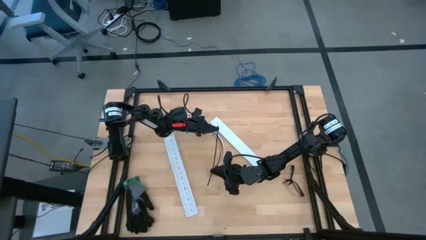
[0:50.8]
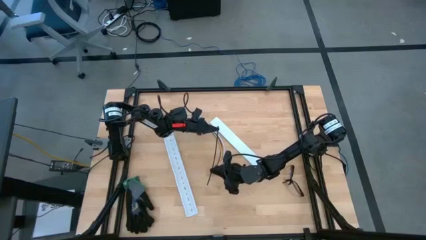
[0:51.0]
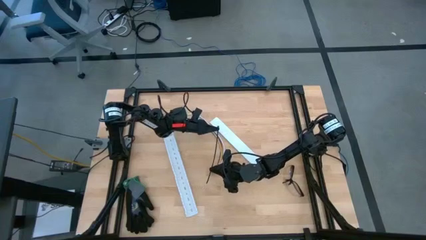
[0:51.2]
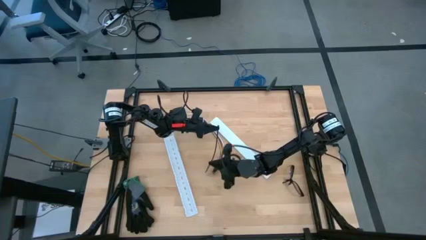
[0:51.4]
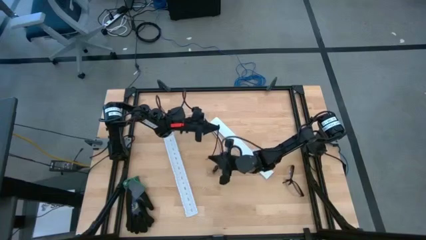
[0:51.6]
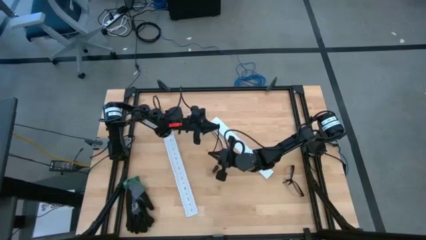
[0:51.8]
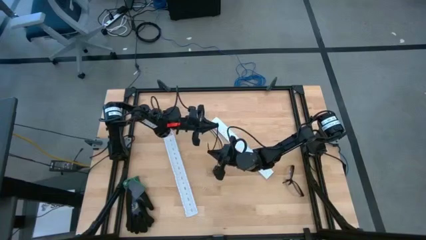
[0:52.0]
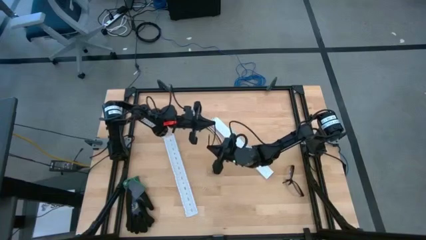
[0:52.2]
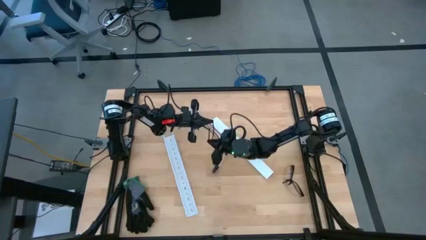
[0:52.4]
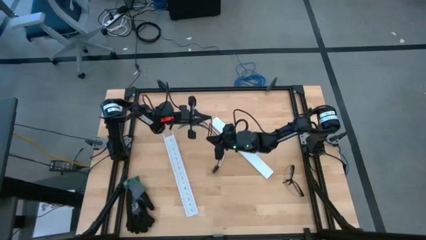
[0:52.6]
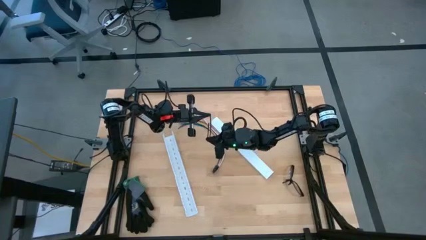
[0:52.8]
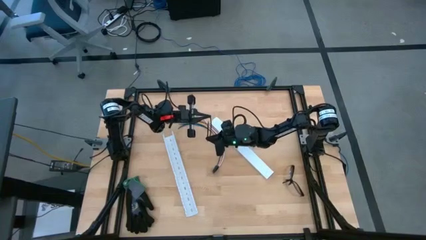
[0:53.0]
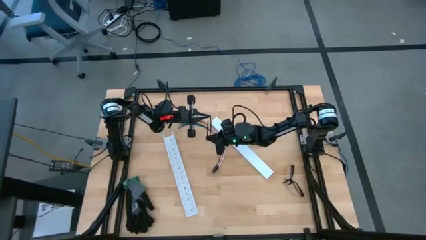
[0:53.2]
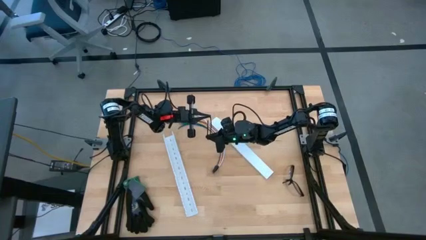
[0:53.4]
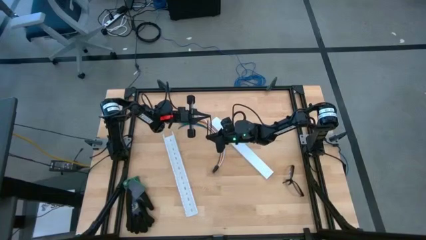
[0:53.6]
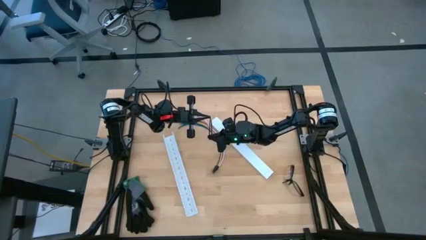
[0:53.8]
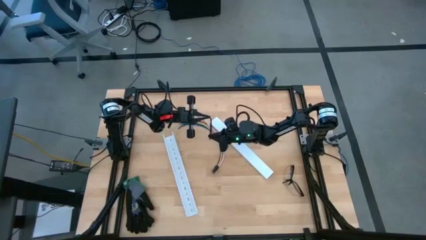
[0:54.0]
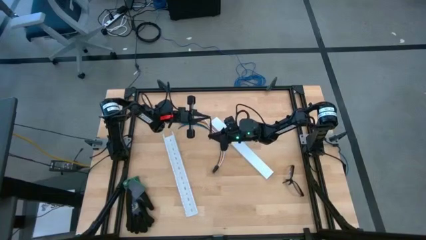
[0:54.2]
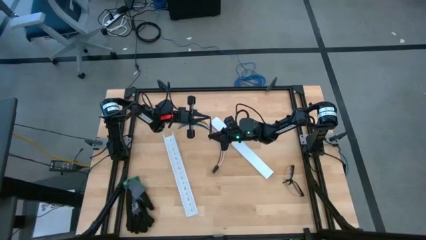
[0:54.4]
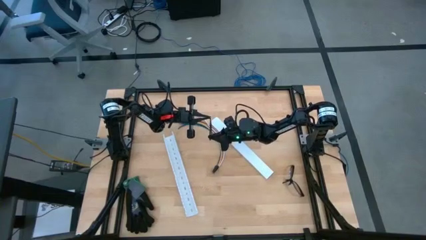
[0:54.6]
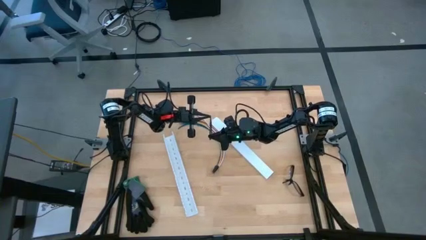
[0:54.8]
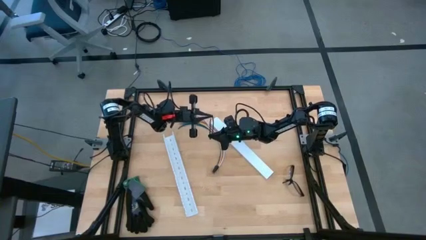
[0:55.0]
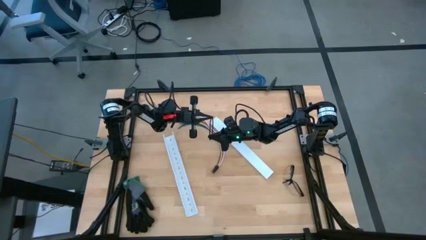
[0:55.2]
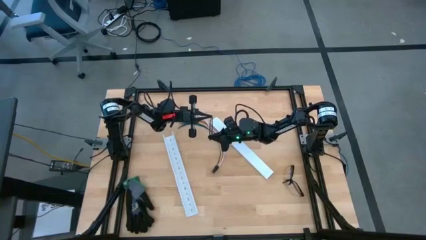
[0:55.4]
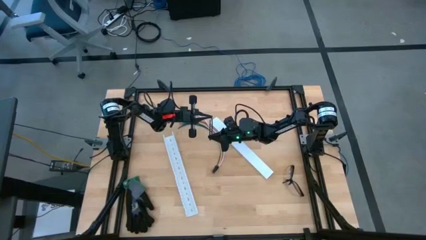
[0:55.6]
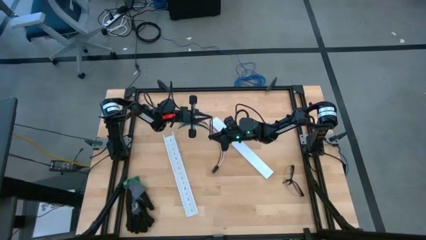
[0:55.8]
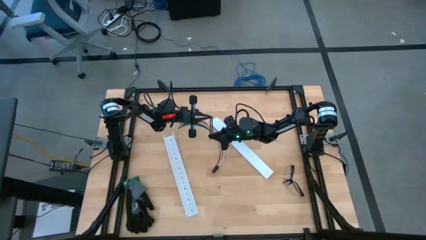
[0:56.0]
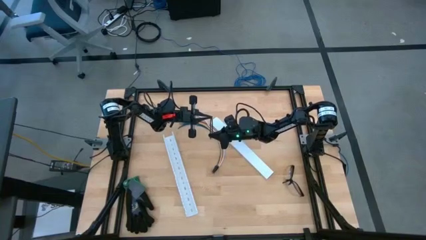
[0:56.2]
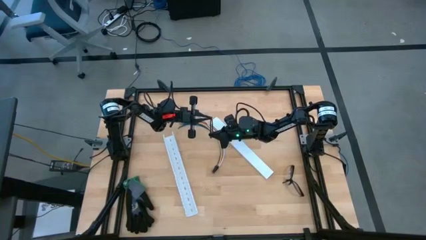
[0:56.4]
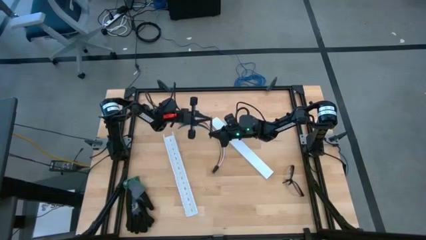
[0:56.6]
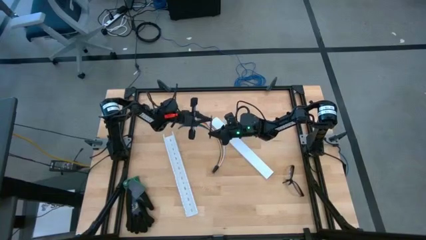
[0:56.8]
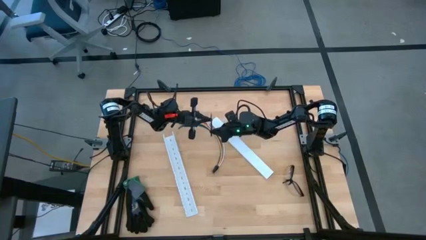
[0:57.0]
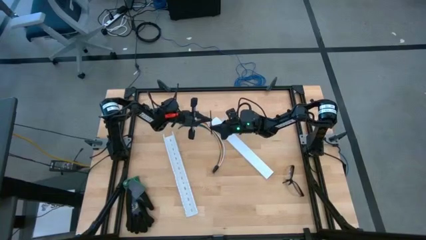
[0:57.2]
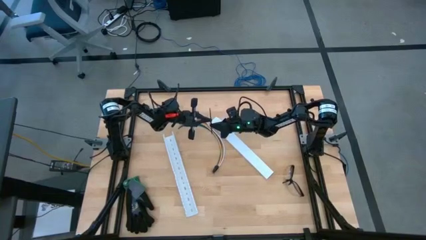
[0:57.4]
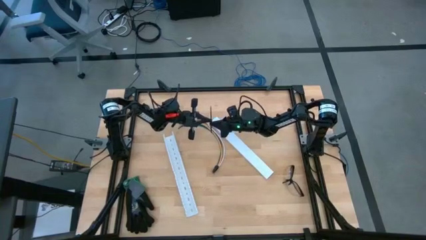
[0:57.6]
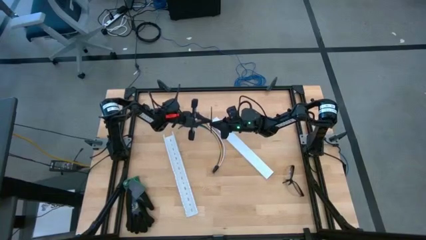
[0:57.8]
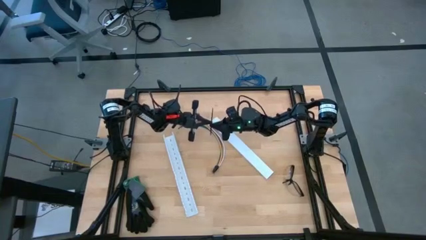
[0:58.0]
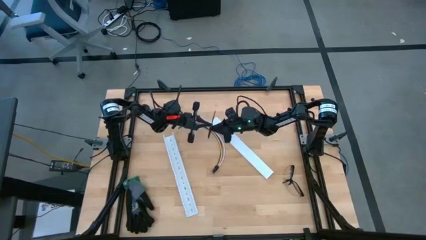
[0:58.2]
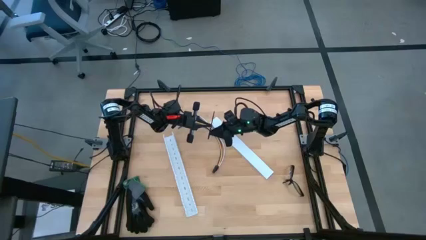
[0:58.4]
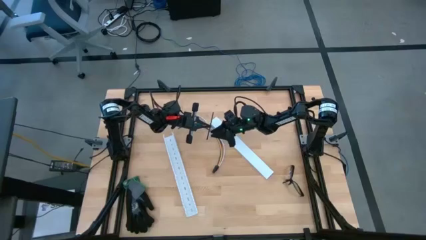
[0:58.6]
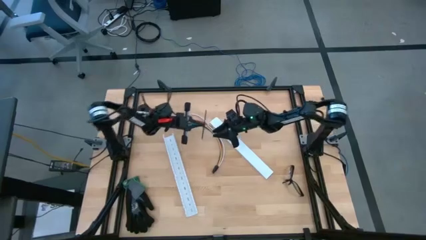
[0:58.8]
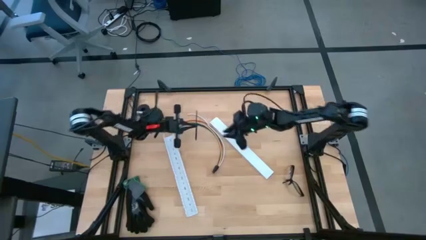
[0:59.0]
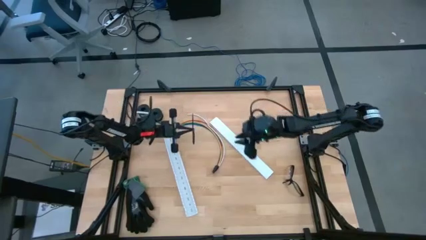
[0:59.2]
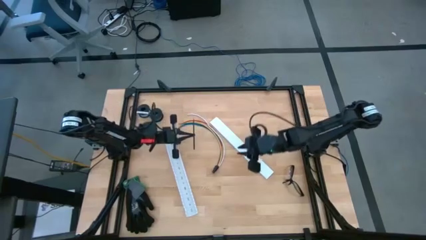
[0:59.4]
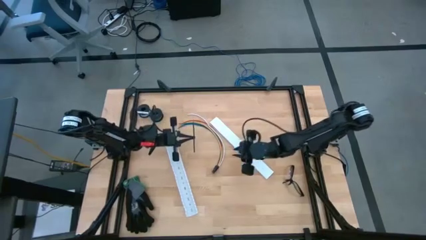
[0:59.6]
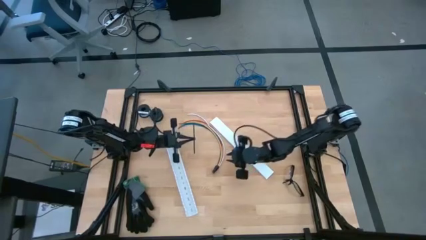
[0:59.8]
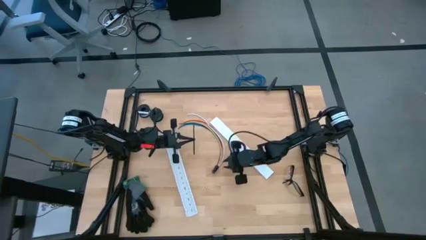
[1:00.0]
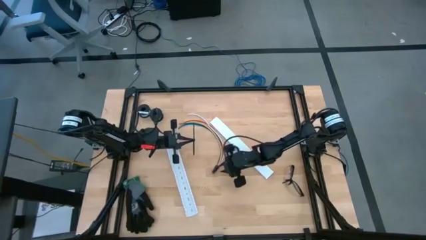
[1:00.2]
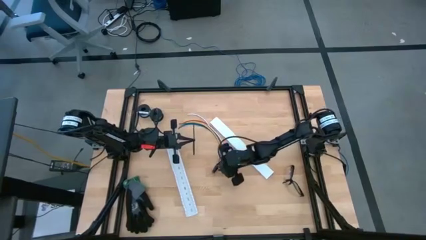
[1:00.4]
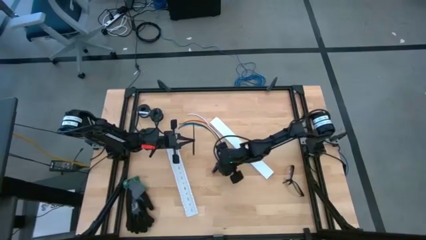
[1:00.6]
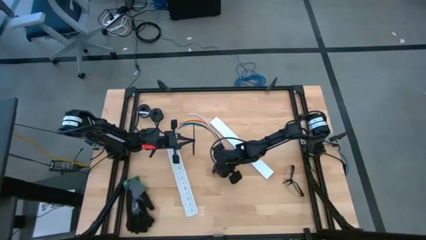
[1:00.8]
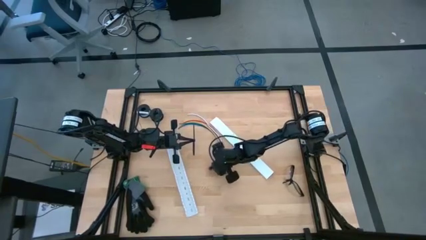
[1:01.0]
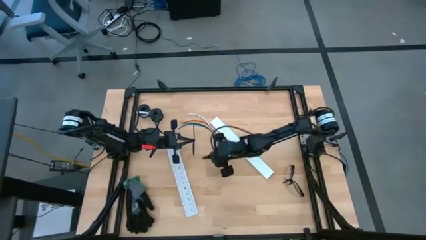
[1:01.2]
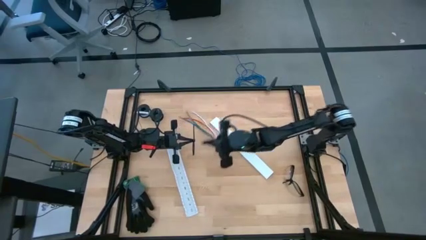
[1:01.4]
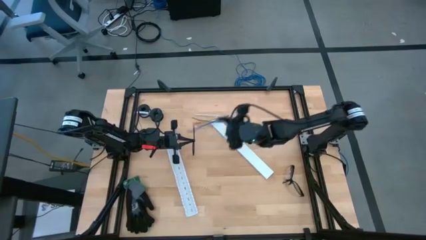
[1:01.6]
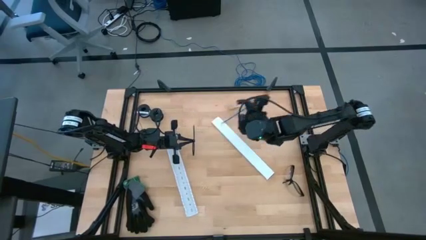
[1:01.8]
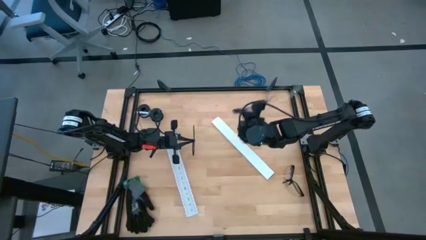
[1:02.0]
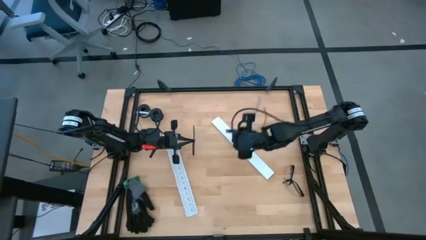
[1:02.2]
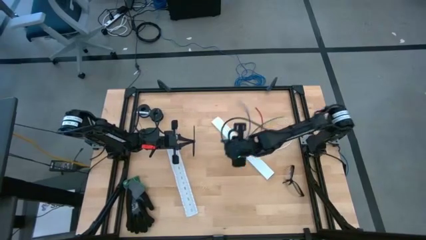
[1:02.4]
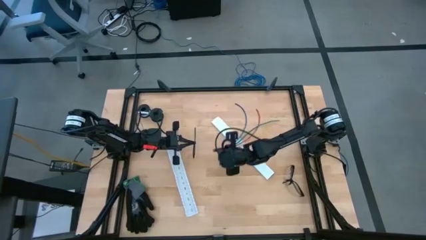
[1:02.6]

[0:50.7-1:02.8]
Task: Ziptie cables
Wrap the cables together using the black zip tie

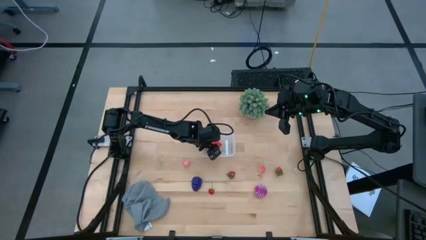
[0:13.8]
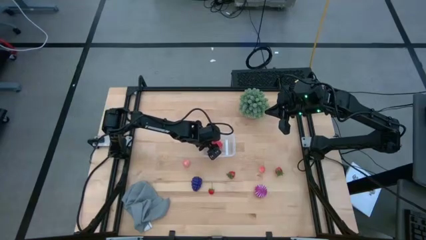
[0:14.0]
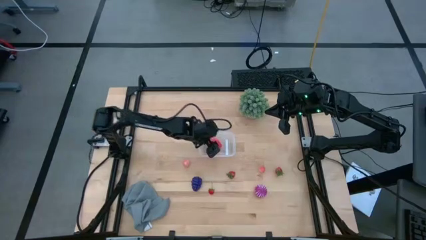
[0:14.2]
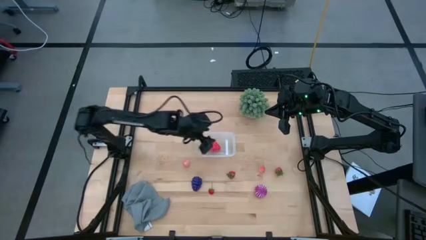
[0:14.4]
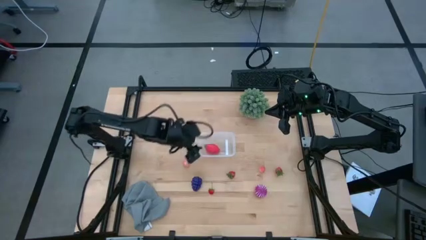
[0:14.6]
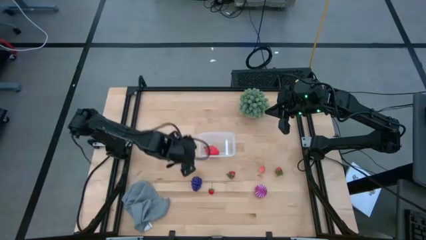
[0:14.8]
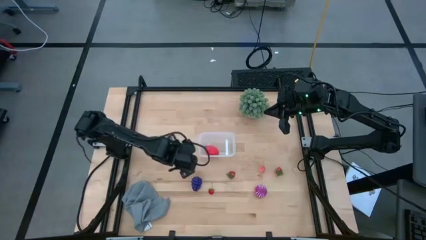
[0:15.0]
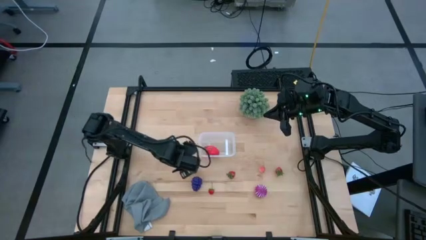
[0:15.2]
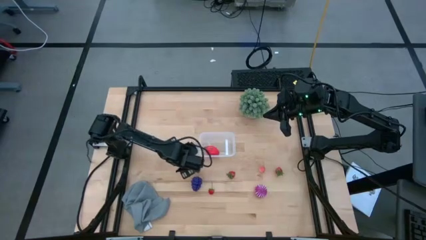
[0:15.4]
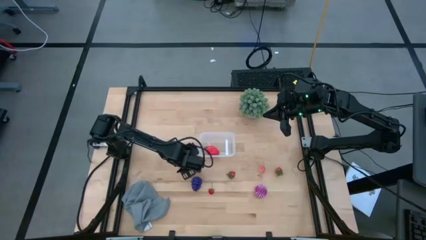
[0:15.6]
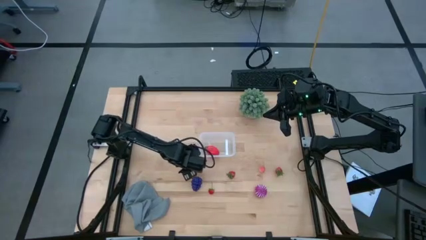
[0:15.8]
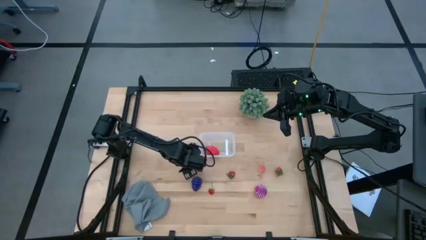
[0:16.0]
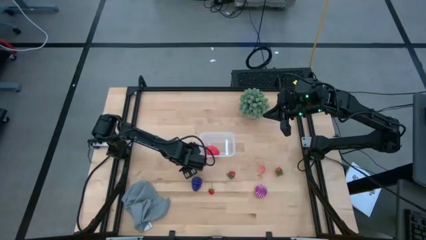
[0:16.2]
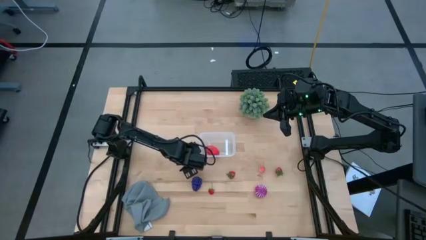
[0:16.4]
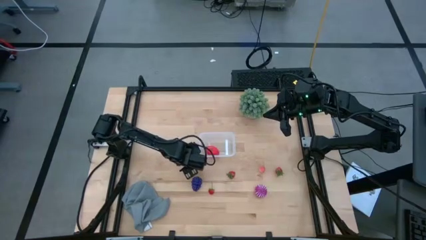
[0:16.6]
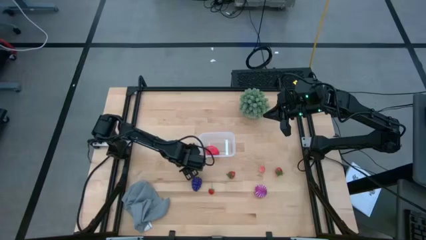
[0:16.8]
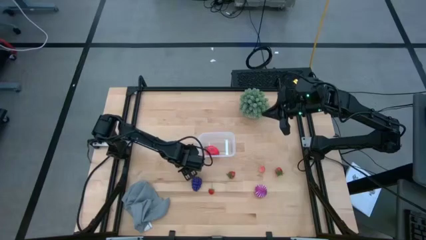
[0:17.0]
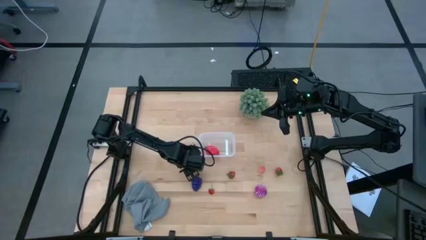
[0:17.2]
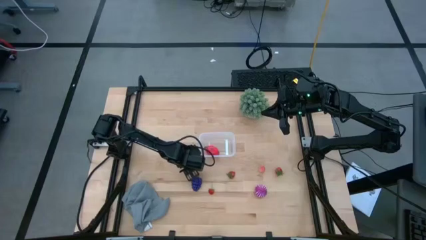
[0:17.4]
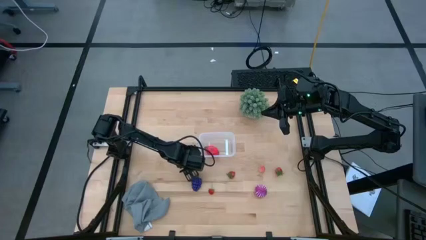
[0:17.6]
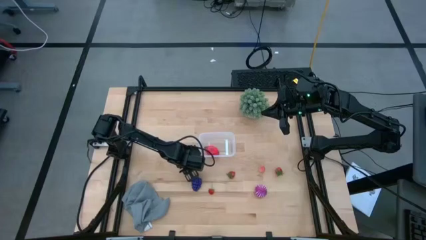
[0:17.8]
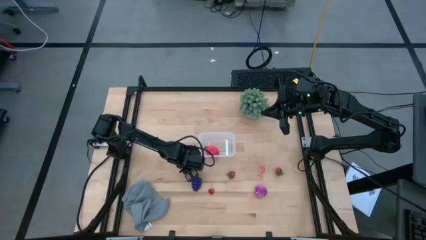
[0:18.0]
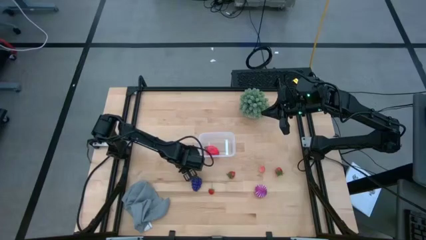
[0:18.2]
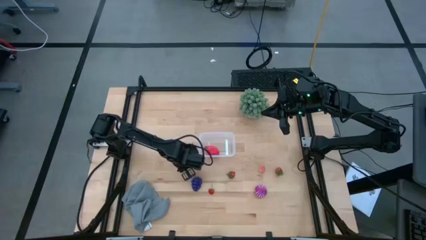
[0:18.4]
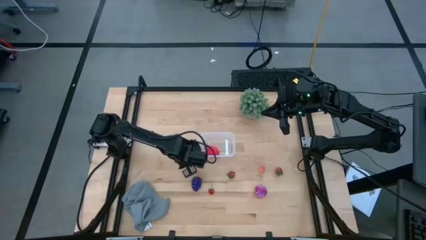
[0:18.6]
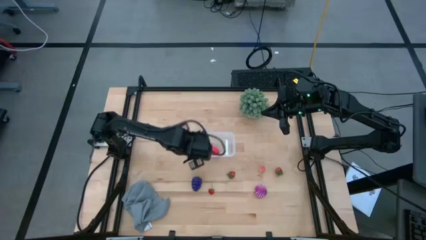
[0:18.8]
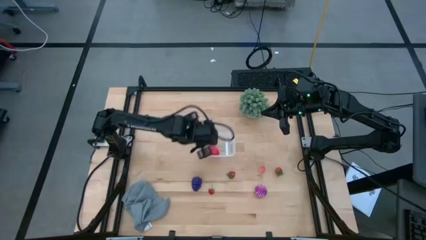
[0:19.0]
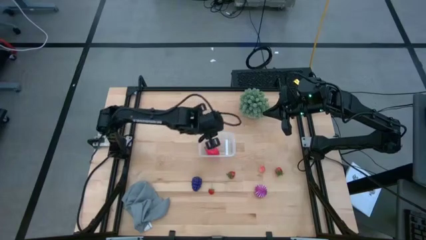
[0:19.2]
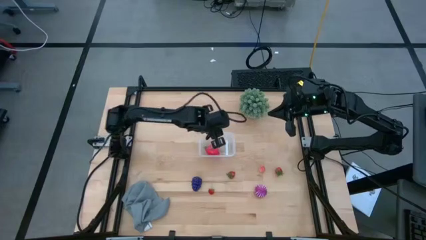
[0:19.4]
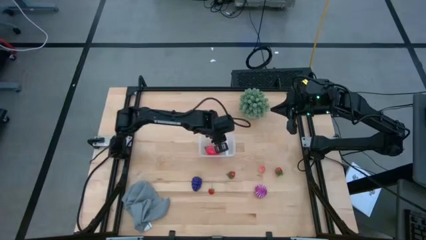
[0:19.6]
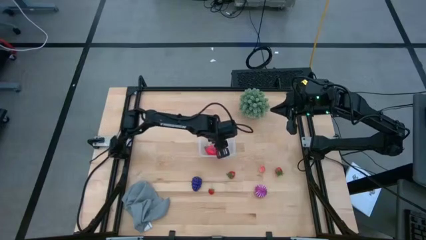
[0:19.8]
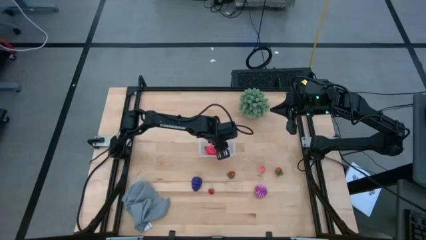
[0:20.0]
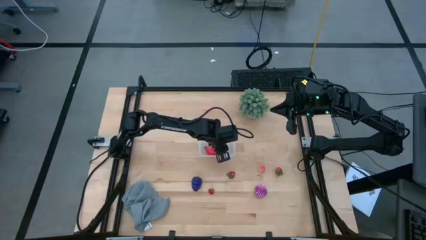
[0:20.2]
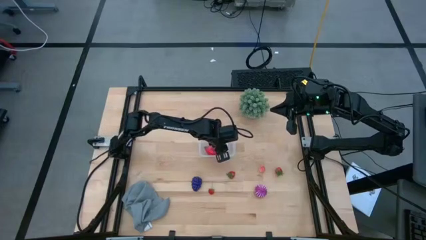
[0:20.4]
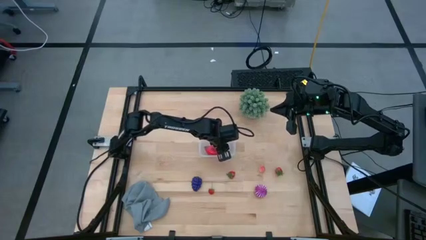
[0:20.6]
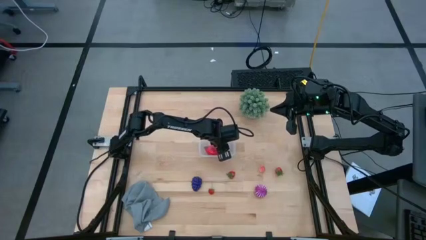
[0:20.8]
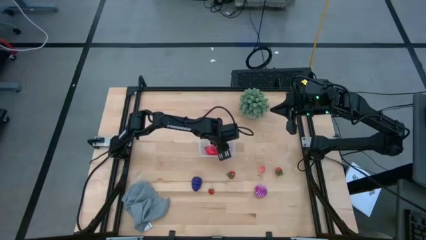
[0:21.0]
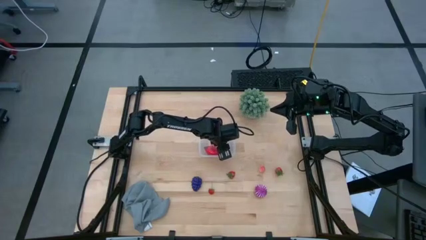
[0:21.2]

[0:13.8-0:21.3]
Task: Pick and placing Produce into tupperware
Put the left pink peach into the transparent bin
